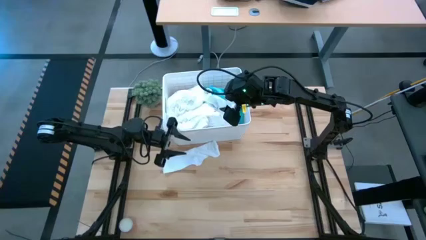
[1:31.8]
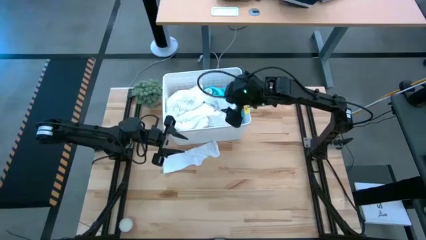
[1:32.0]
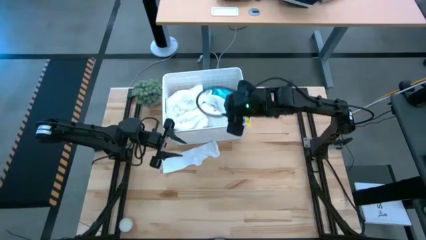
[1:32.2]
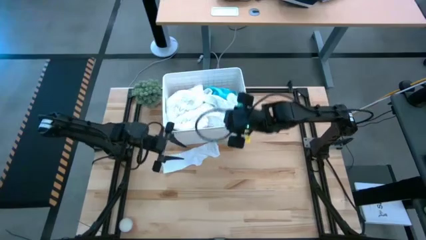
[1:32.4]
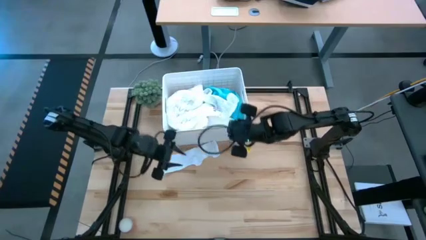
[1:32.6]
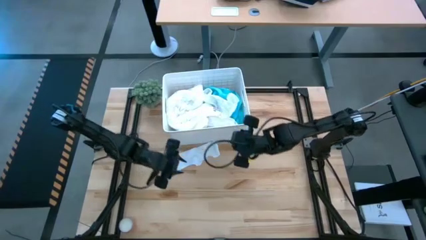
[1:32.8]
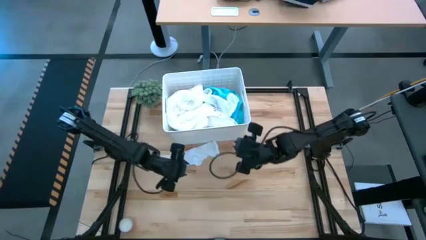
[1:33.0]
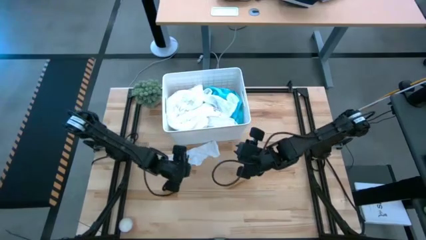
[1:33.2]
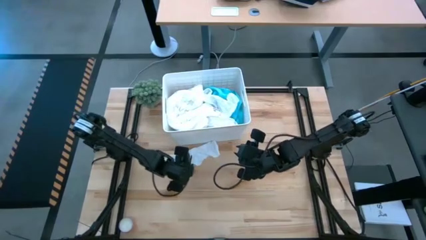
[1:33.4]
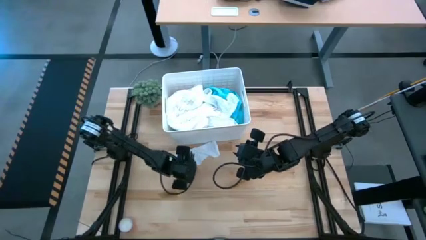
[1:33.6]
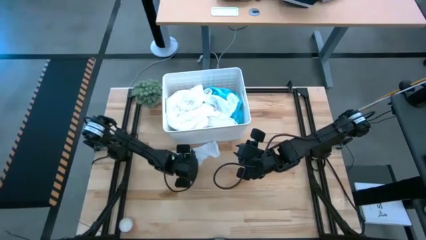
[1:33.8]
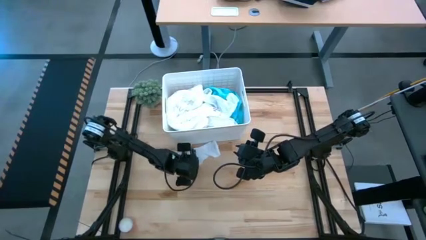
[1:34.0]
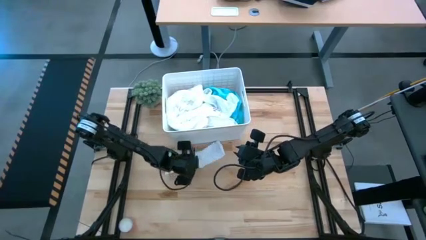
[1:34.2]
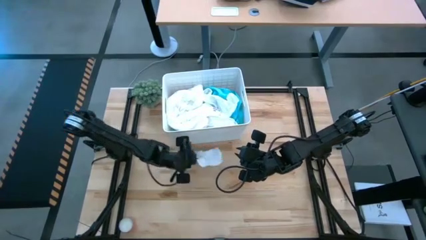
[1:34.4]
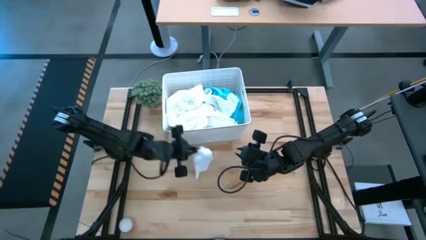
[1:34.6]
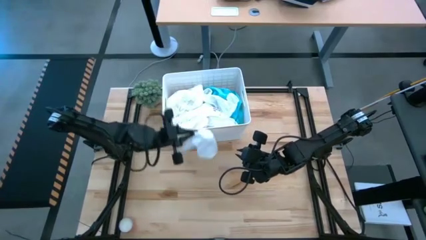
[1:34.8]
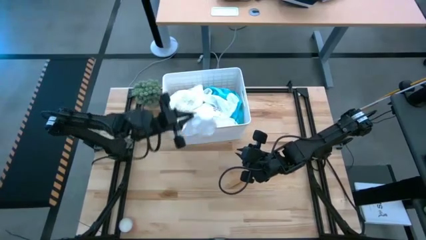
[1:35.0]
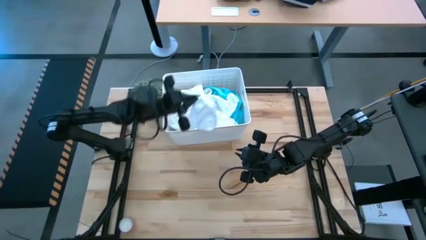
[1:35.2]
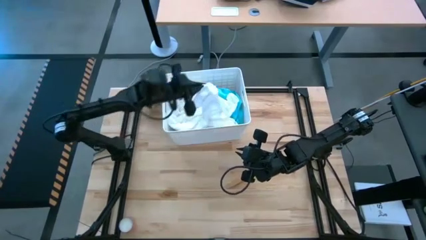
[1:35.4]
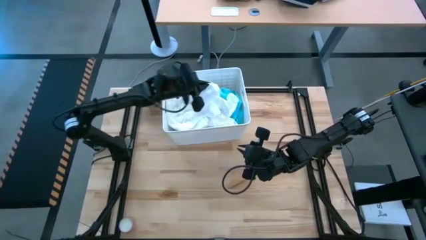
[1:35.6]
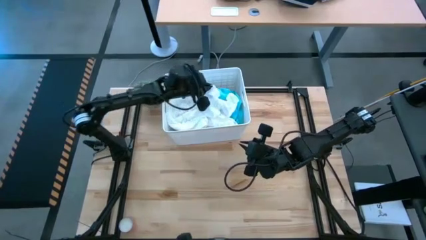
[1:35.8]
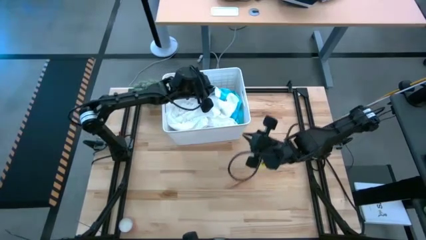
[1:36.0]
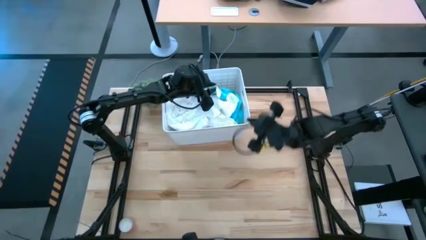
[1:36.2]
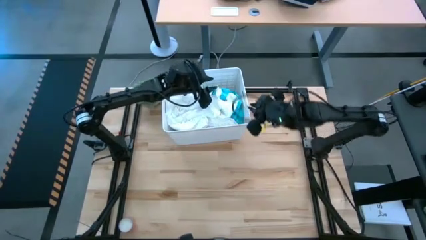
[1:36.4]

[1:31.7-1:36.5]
Task: Sort clothes
Put the white sock into the white bin

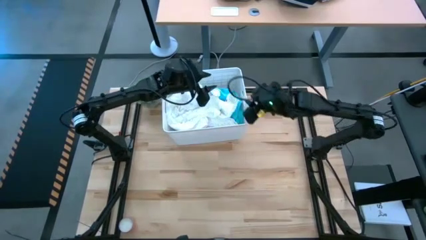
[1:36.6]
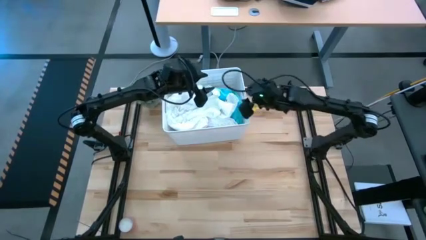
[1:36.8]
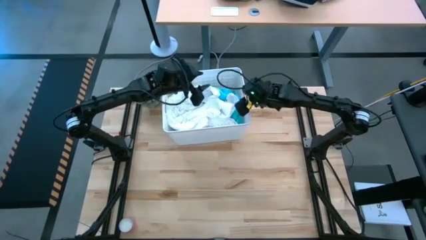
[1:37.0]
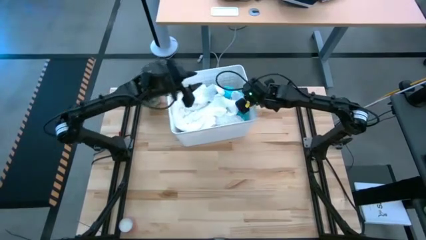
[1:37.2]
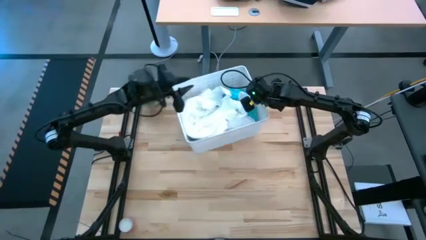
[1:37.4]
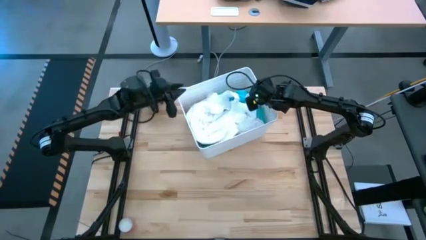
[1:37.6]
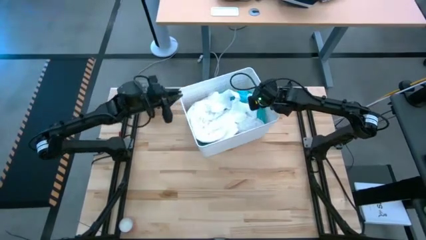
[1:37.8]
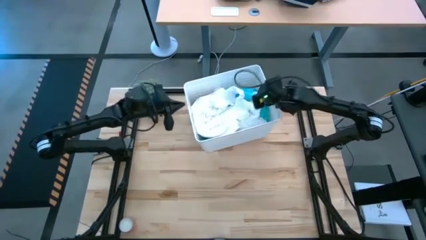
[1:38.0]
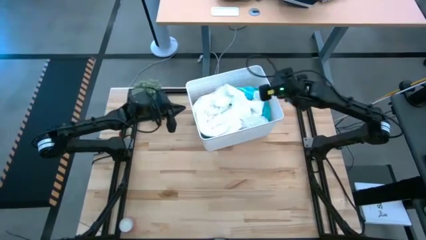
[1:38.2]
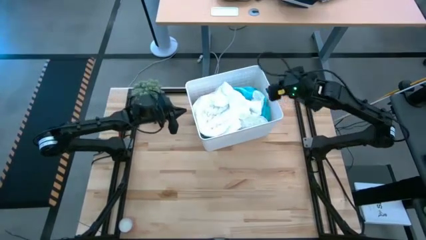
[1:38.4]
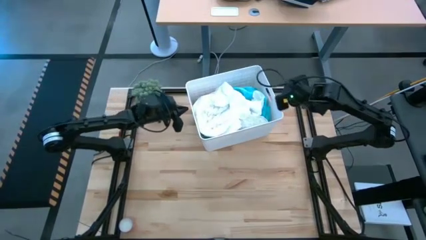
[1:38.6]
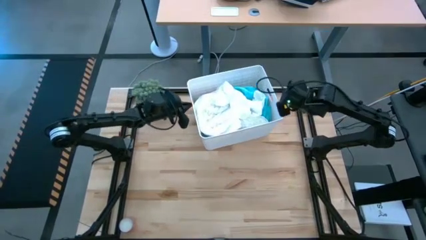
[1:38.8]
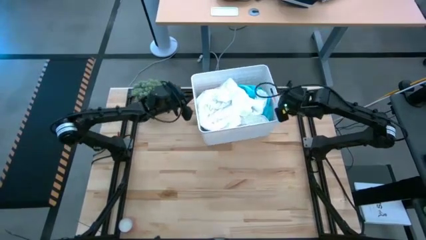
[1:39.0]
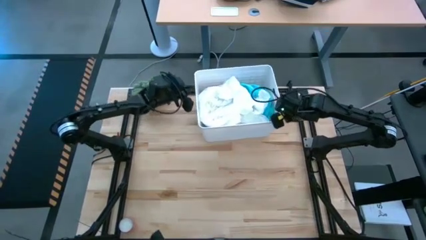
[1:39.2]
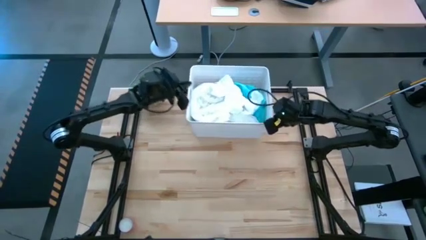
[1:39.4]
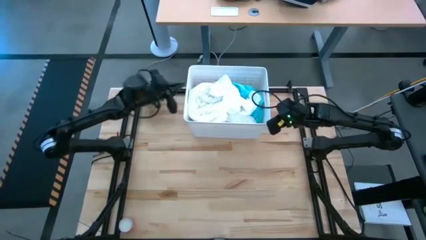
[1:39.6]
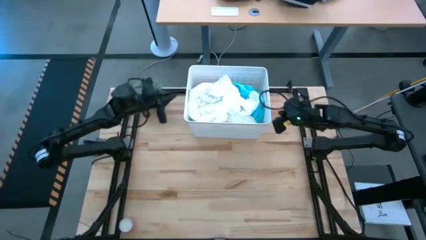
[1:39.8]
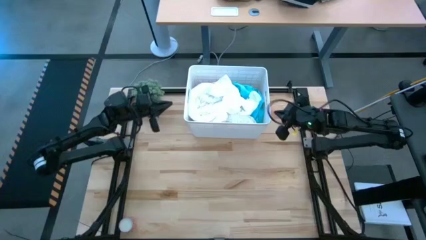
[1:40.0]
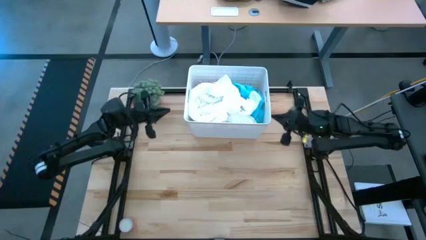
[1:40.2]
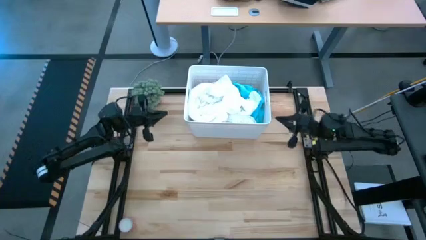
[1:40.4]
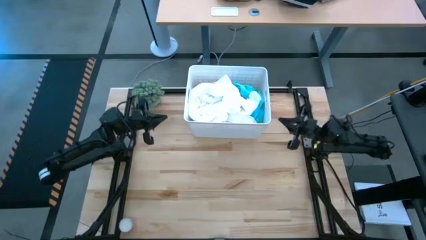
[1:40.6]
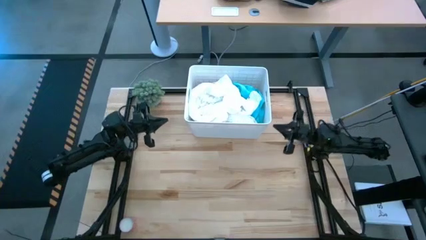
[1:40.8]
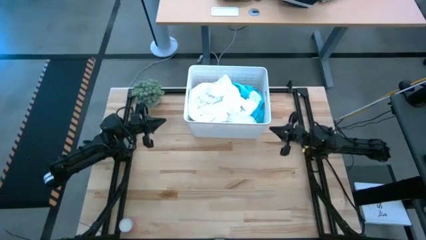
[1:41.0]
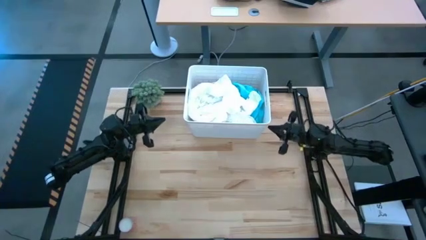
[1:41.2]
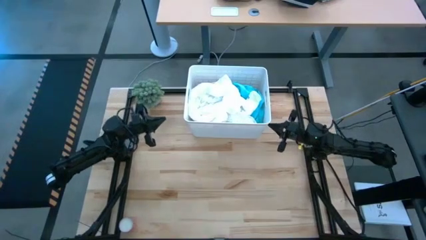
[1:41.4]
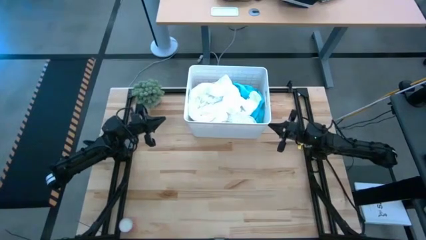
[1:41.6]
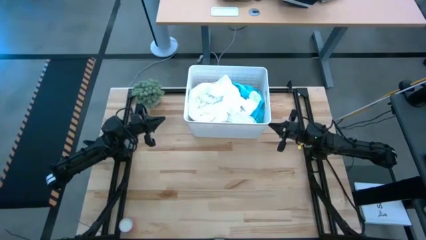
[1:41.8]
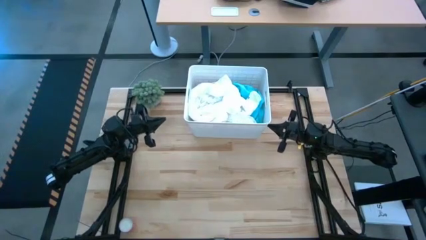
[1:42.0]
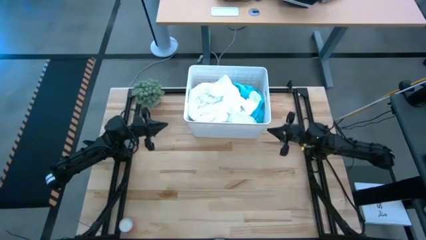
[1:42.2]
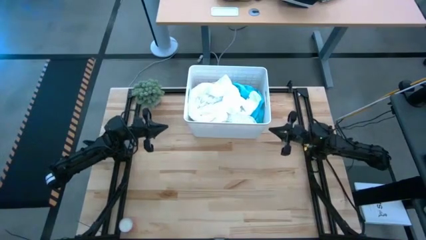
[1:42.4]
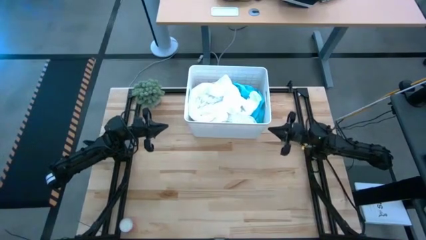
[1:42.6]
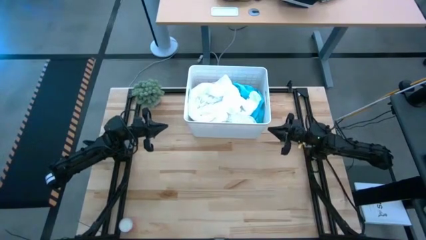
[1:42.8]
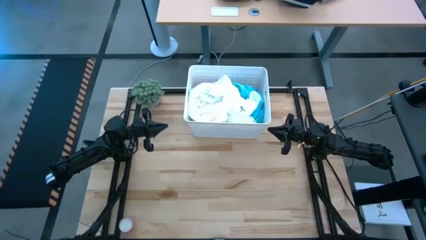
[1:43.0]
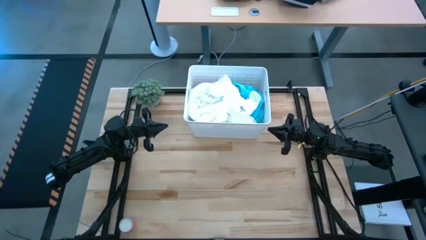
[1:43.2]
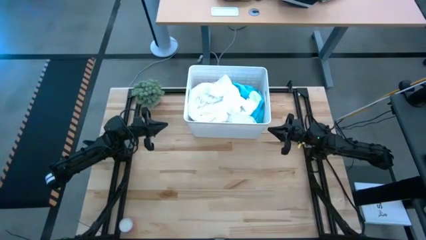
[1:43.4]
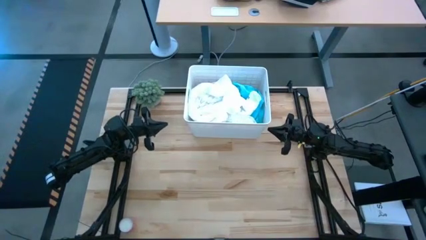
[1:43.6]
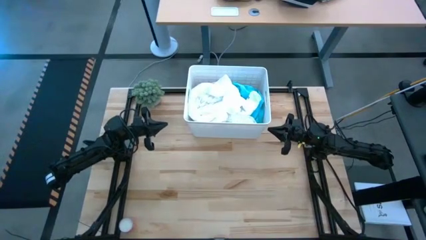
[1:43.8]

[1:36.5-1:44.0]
Return to Home Position

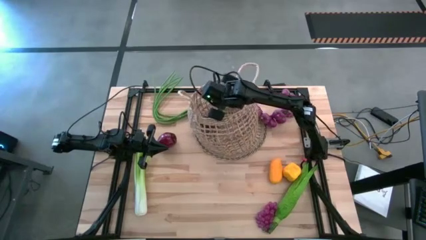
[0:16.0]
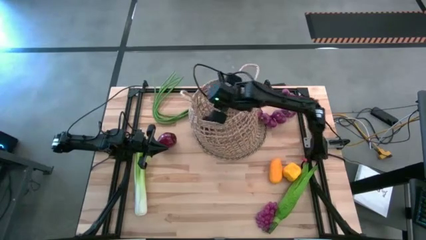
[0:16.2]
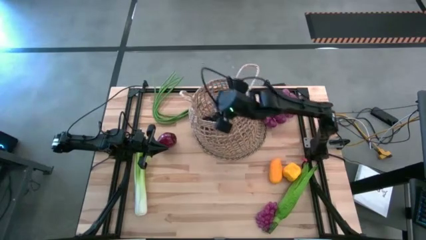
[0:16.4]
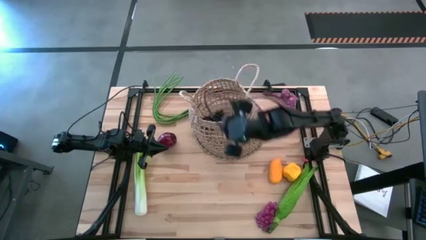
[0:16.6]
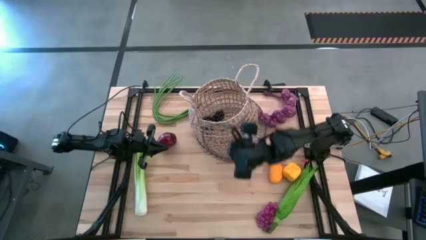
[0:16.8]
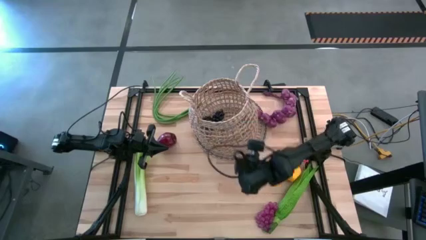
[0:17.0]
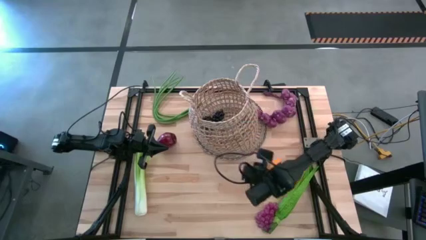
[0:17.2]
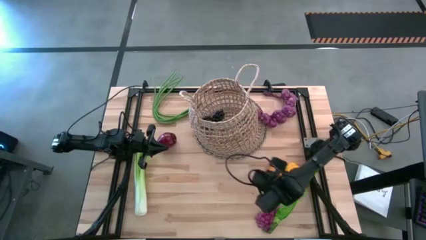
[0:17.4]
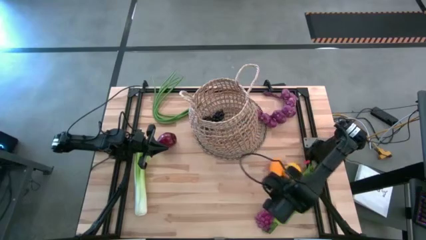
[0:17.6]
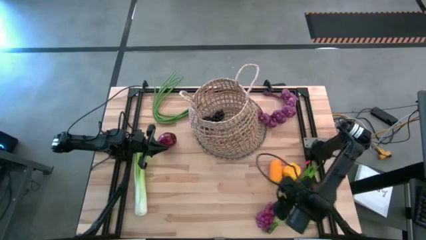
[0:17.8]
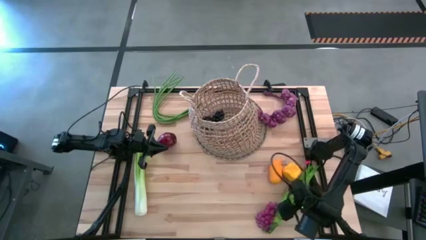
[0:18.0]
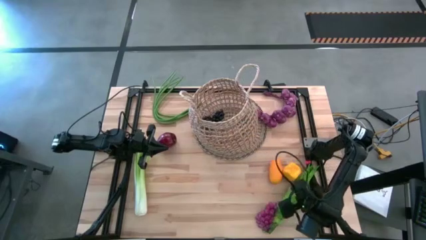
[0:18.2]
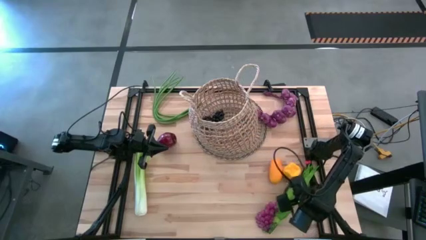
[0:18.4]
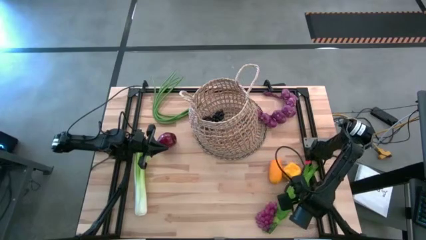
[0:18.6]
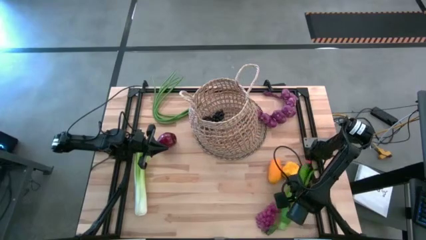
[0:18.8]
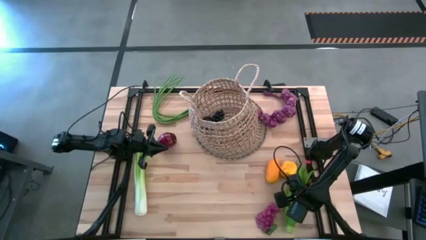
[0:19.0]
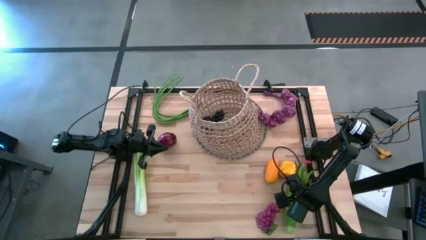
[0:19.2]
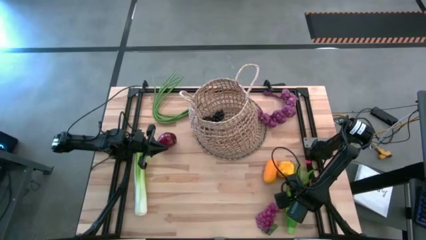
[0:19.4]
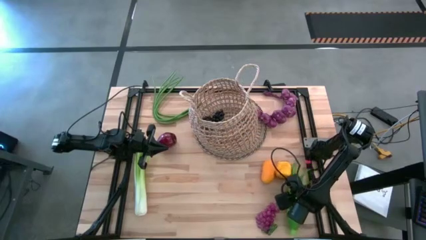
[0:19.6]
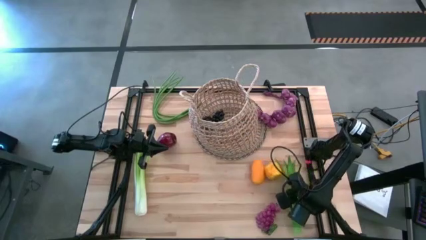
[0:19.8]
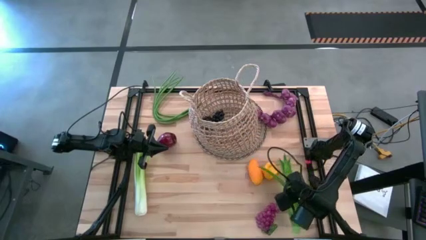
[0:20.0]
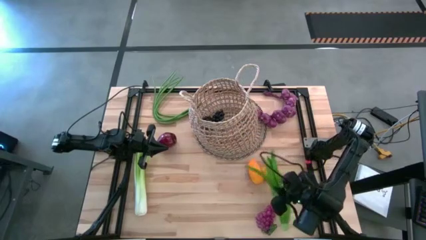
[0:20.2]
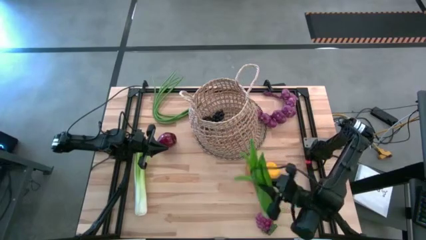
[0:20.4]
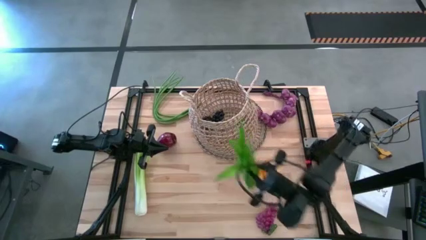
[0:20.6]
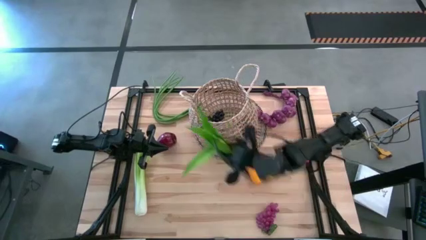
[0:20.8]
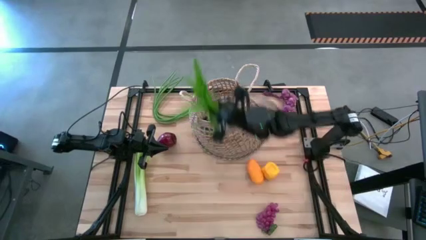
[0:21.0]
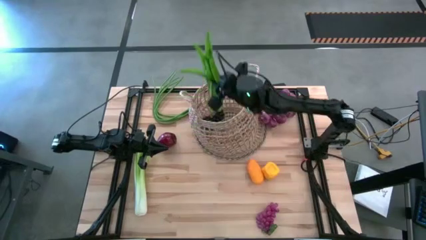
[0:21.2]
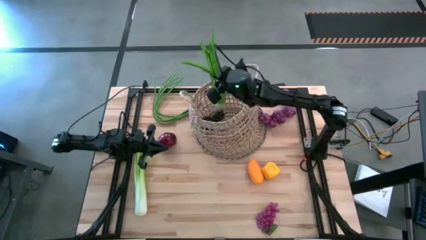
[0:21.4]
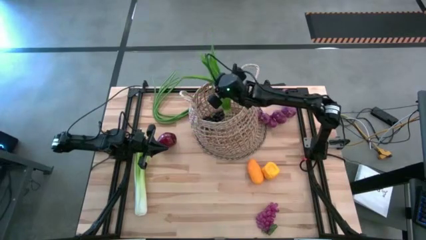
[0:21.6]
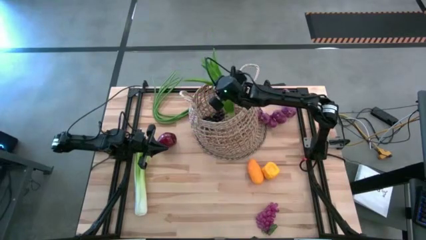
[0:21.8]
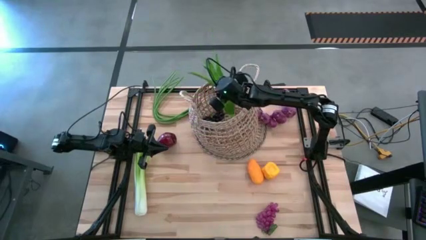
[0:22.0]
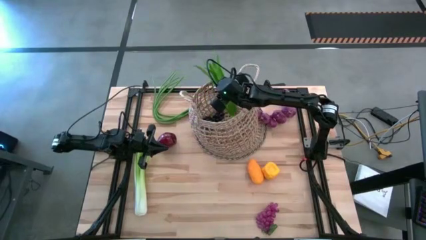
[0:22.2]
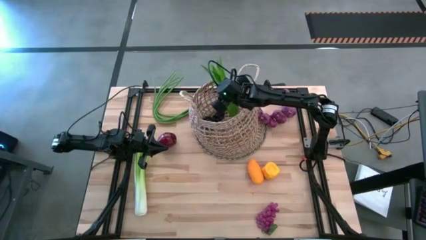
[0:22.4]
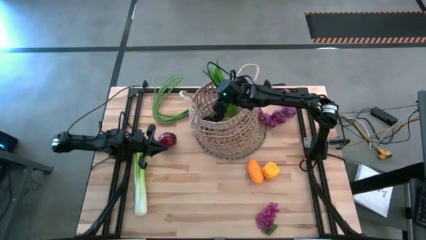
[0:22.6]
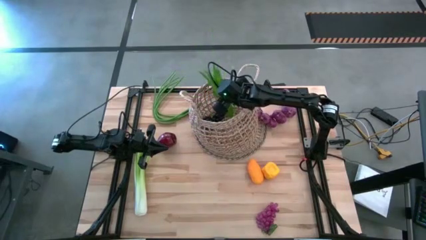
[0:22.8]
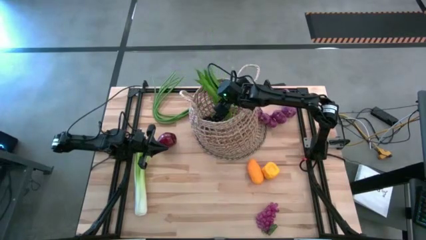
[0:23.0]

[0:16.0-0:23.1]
Task: Build produce basket
Put the green lettuce into the light brown basket
